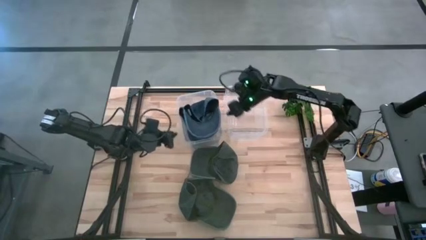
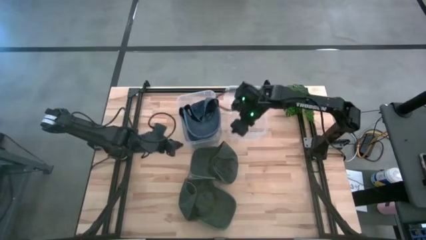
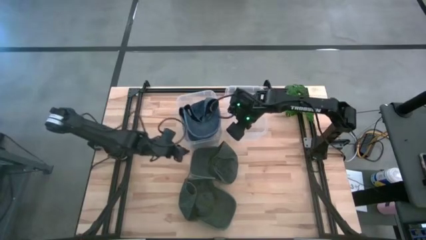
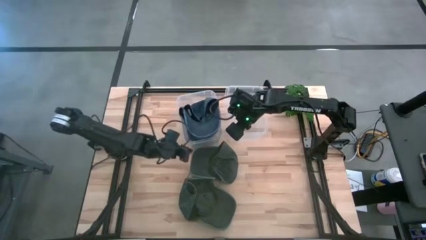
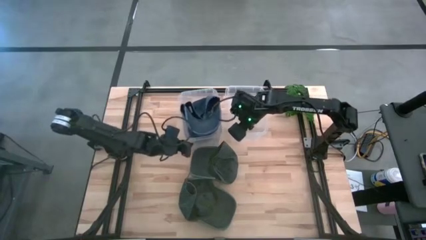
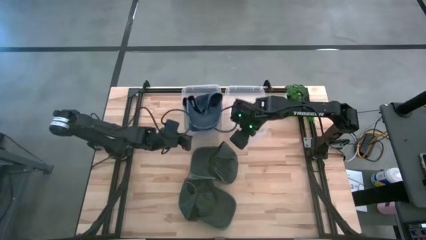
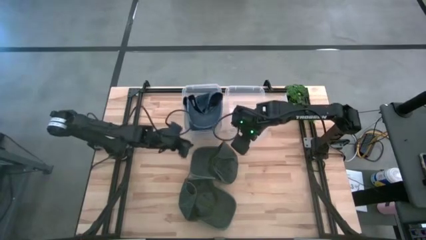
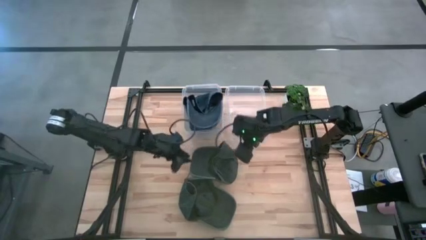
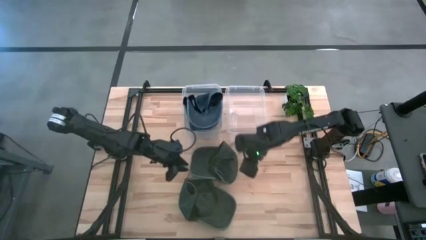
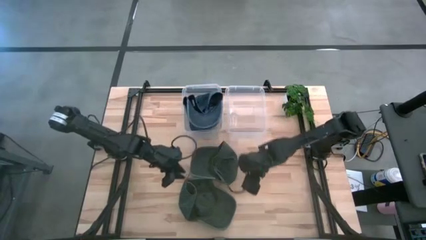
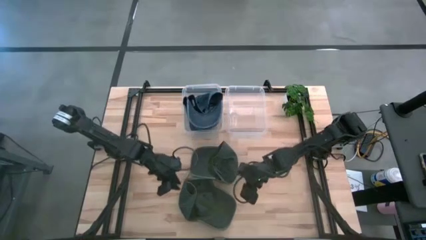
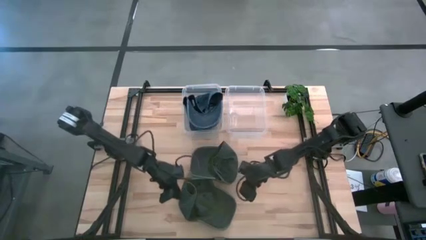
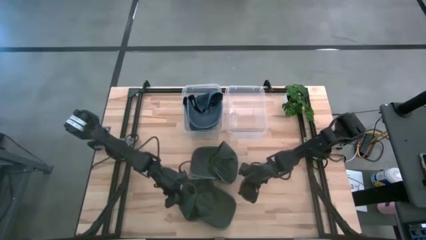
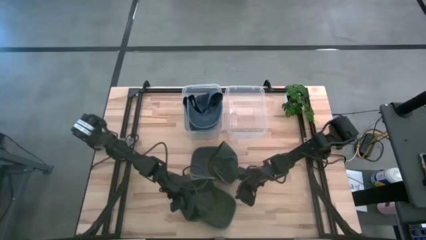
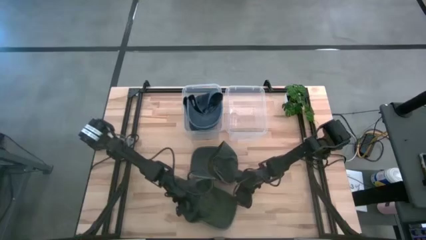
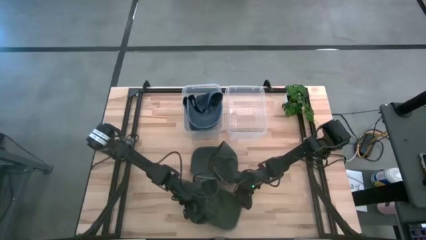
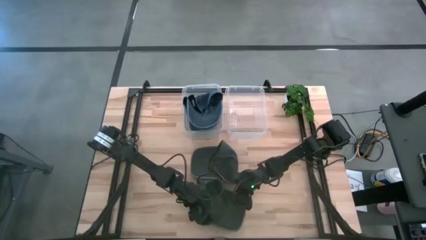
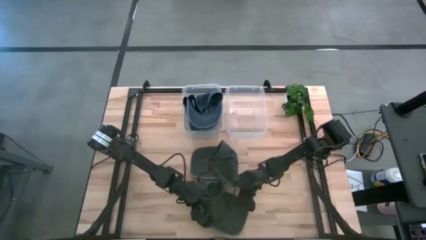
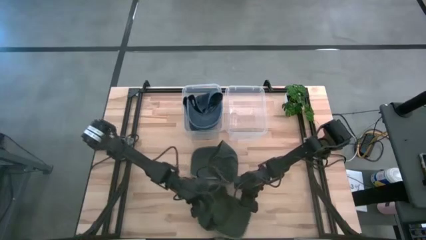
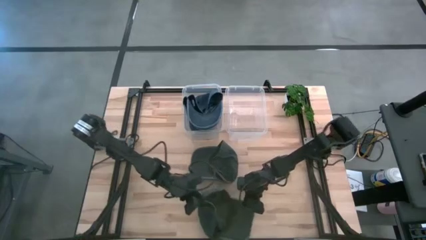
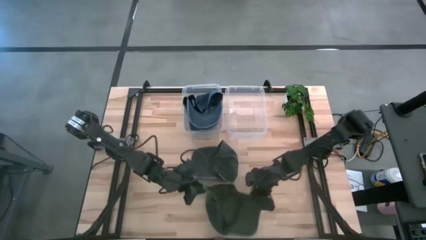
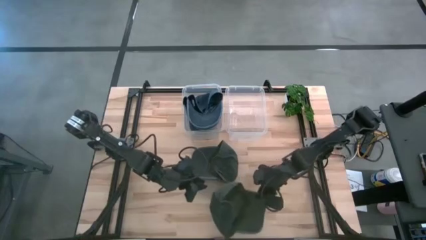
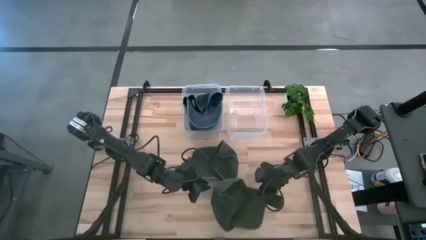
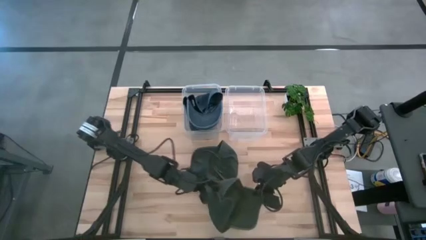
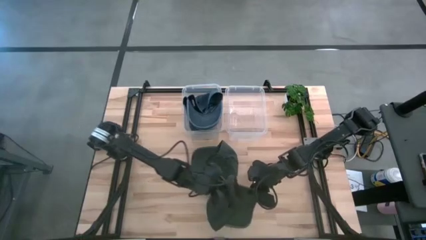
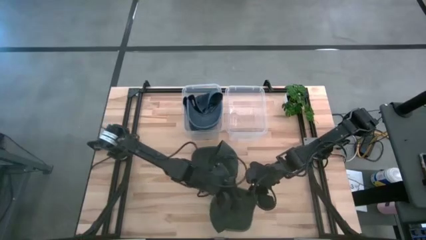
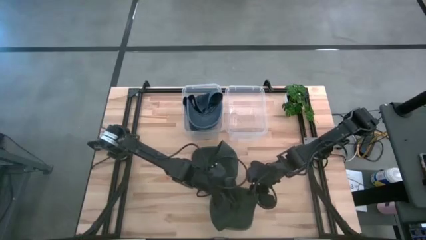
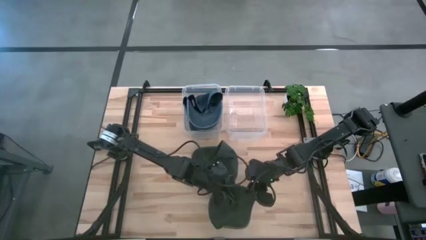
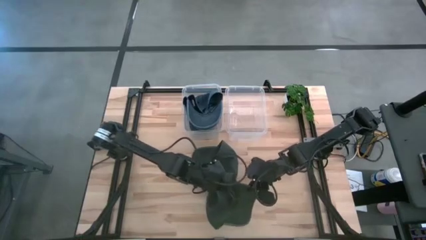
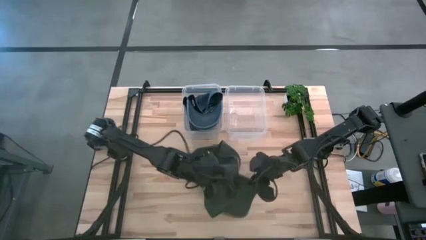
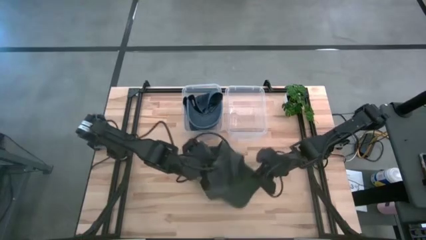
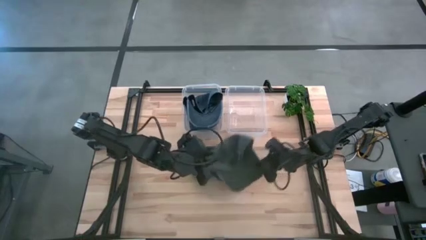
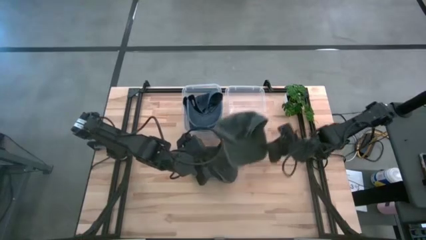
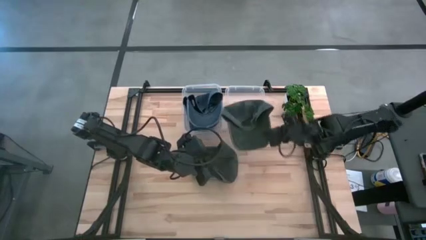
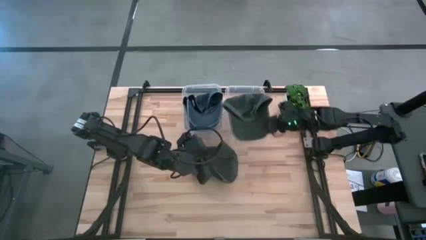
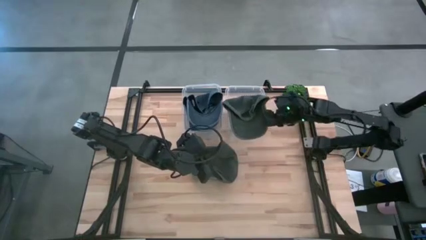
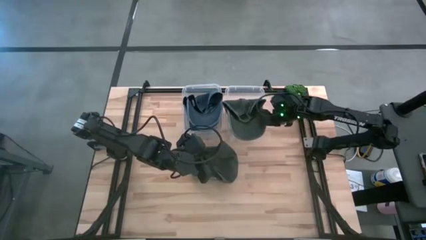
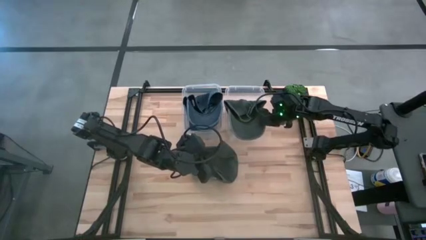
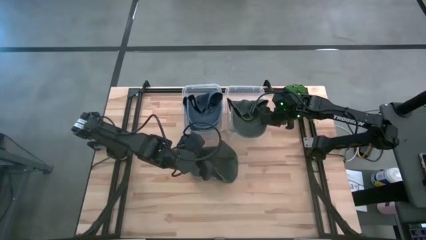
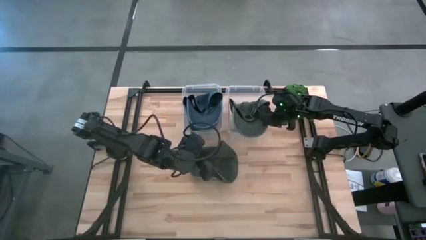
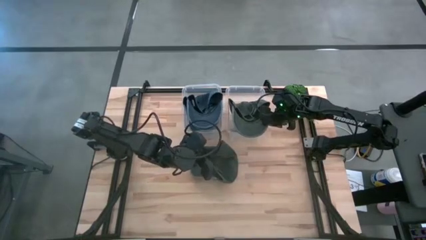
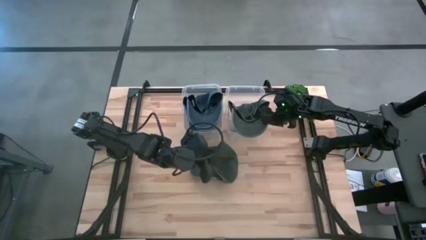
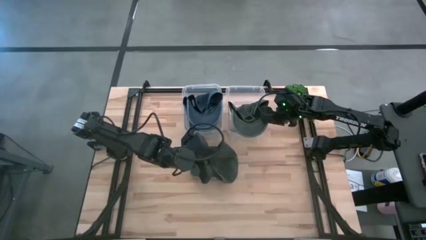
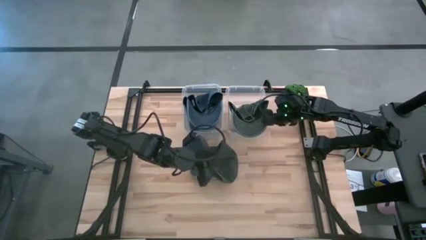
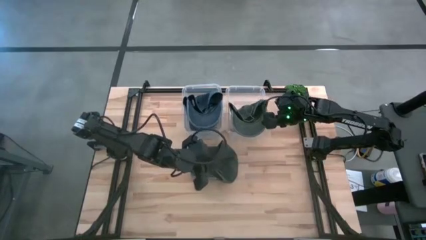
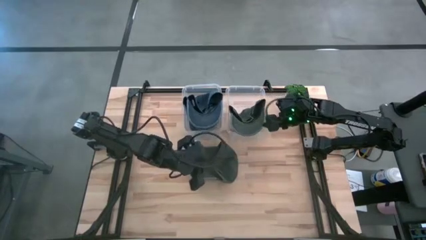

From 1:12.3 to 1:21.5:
Task: Pick & Place hat
Put the bottom black cap into the right transparent bin

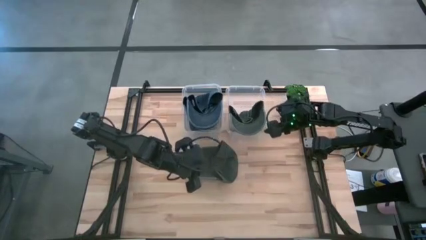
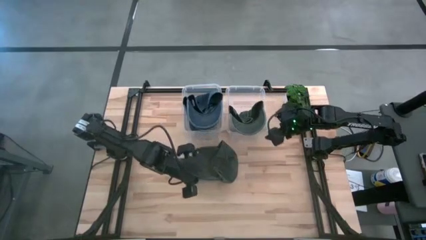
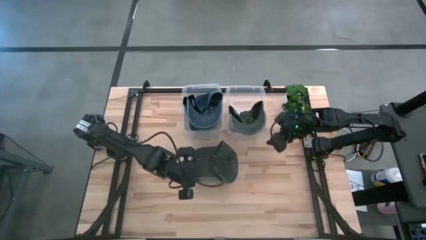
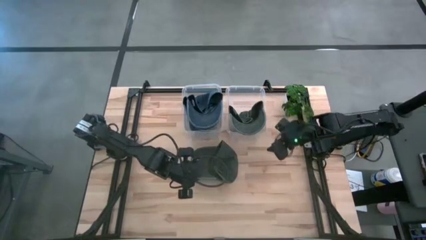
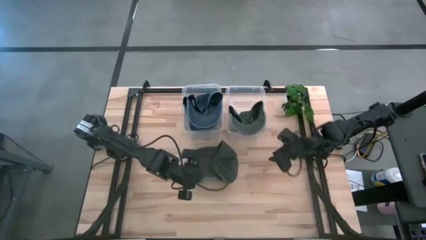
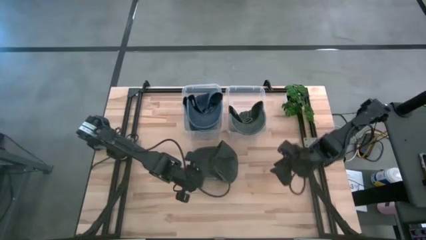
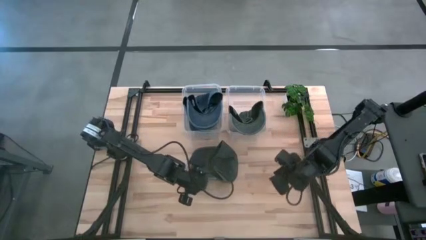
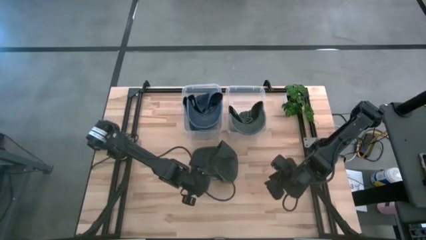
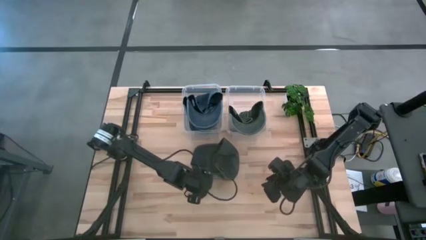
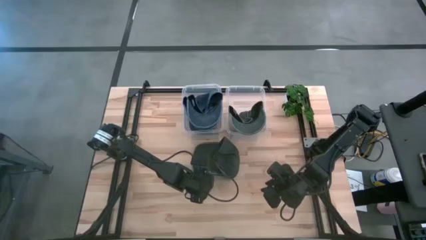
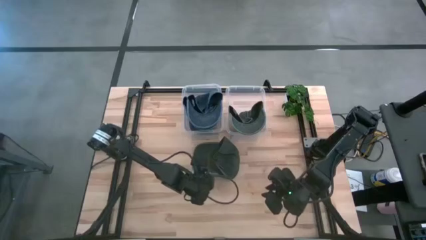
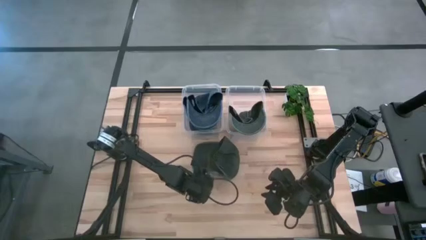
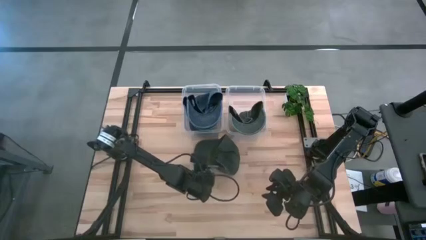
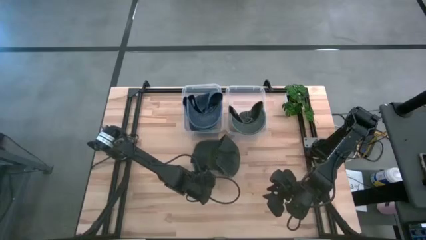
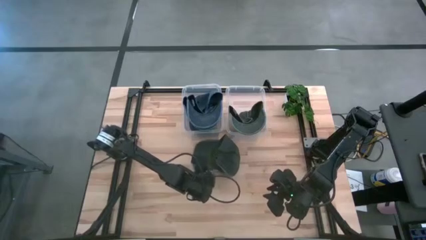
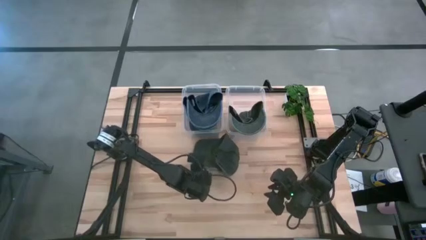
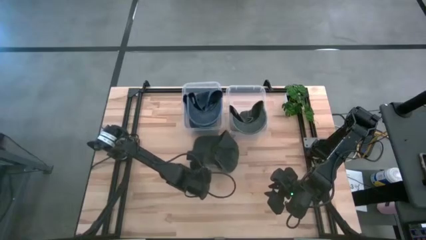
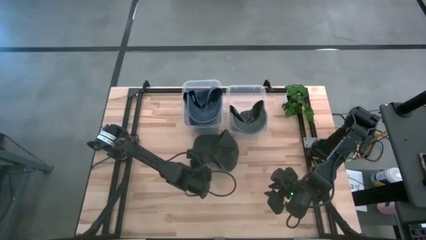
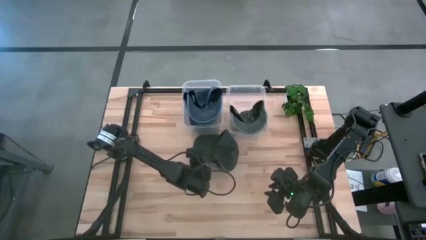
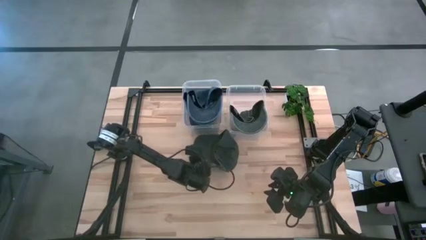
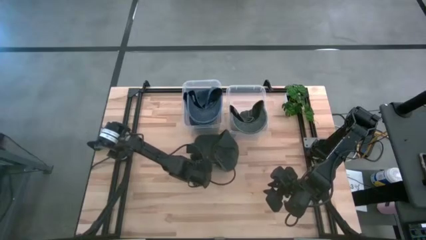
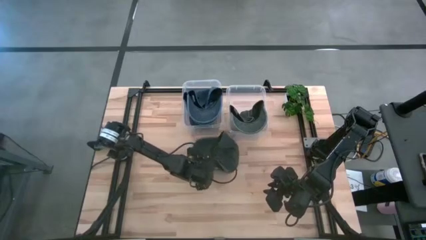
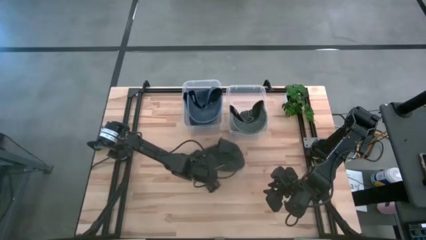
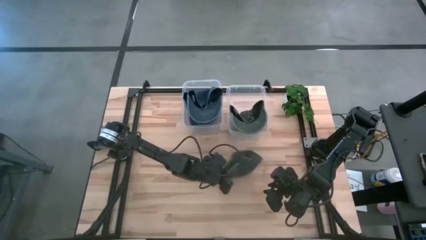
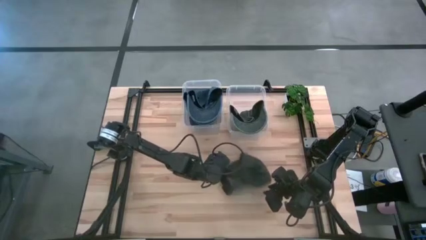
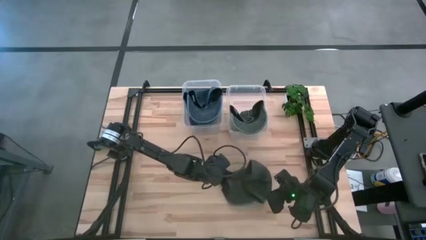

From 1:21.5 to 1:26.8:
Put the black cap into the right transparent bin

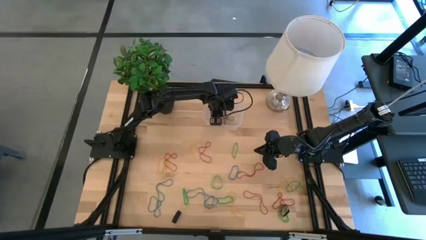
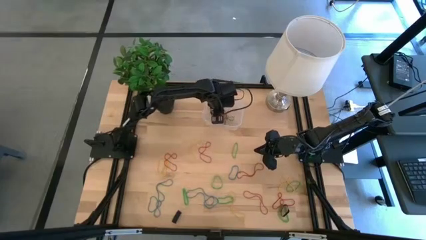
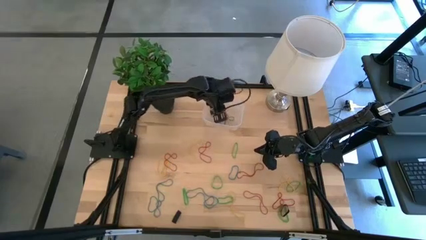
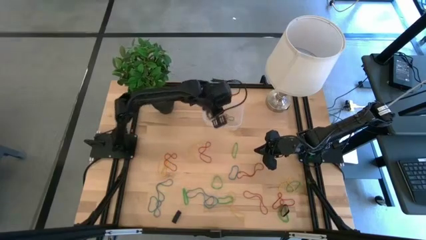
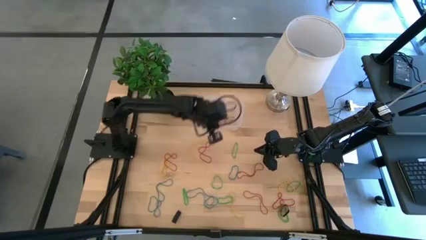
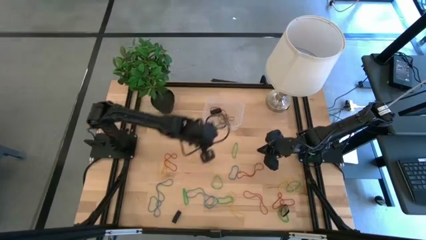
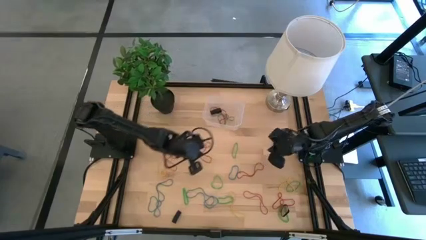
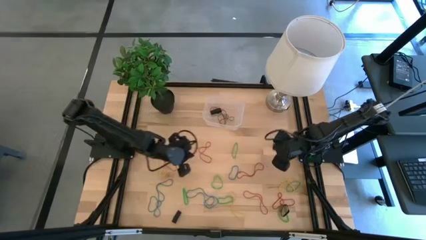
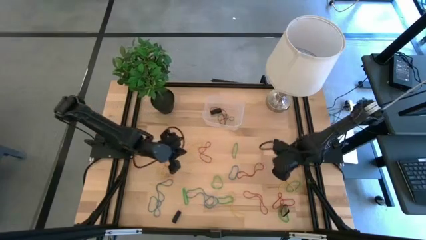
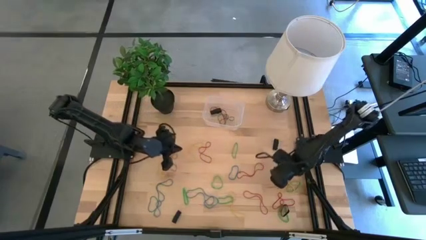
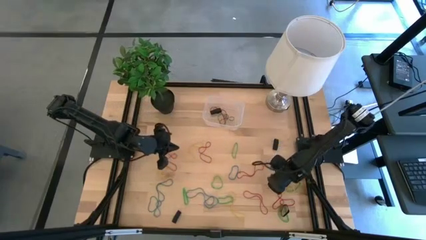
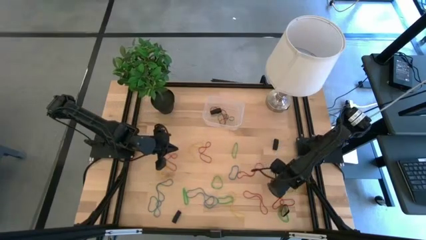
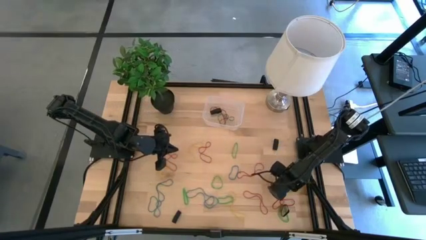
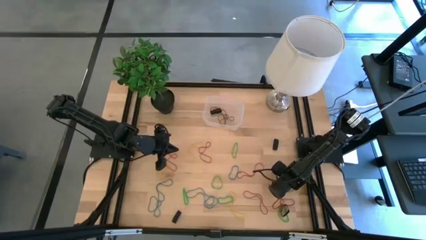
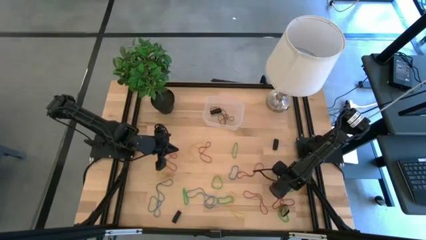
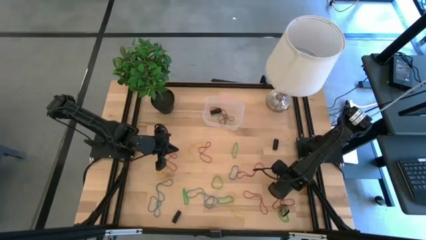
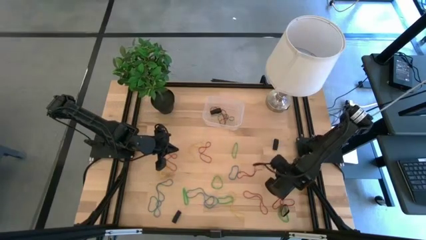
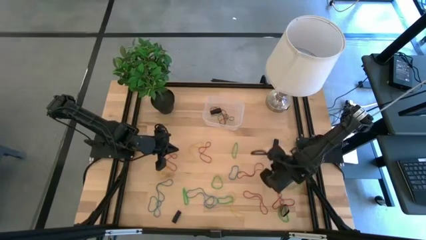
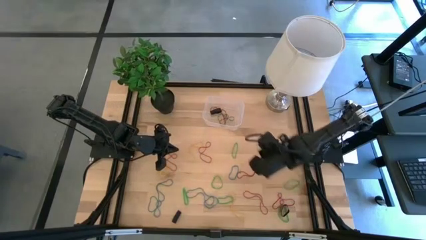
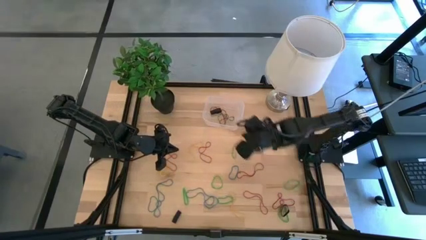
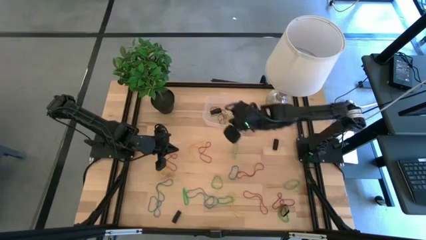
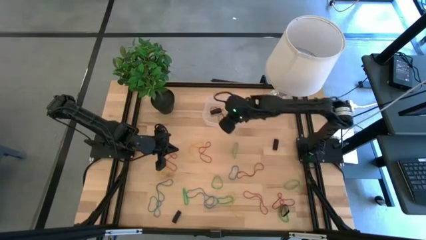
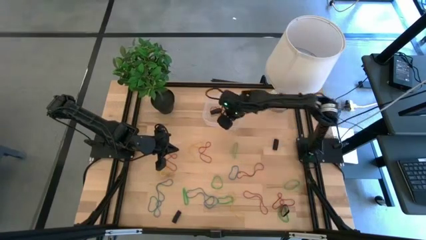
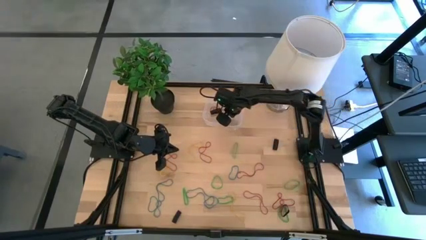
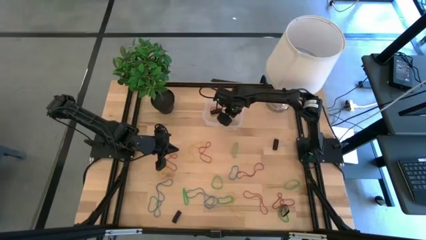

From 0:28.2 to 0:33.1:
Task: Pick and place rubber bands into bin
Put the yellow rubber band into the transparent bin
